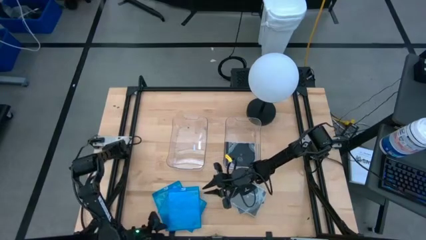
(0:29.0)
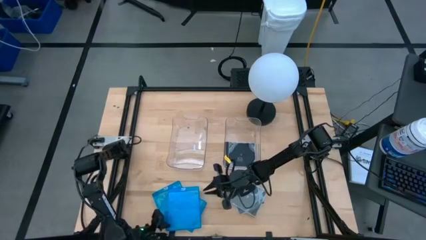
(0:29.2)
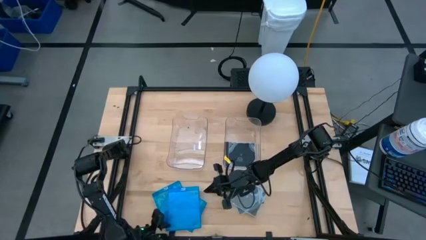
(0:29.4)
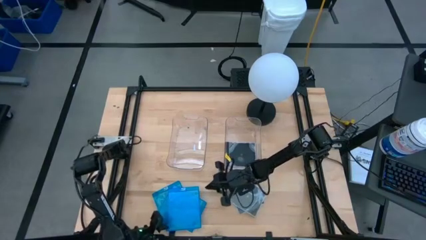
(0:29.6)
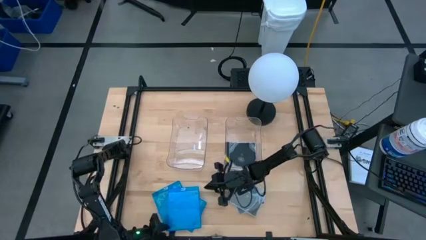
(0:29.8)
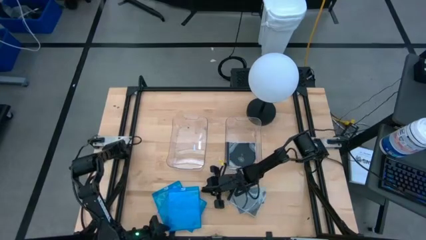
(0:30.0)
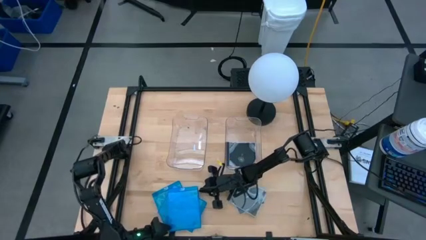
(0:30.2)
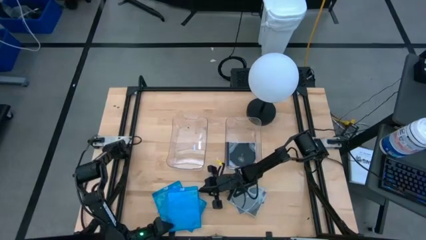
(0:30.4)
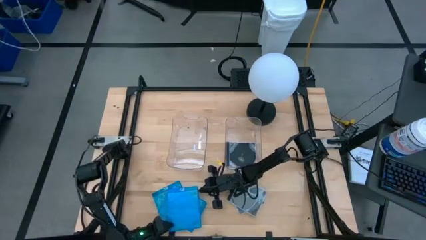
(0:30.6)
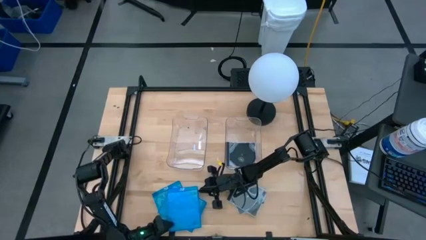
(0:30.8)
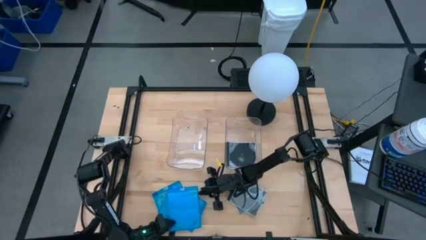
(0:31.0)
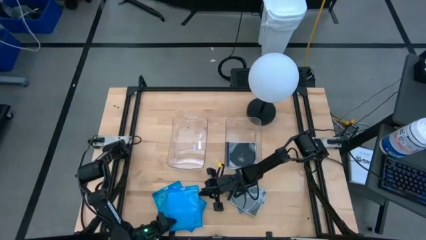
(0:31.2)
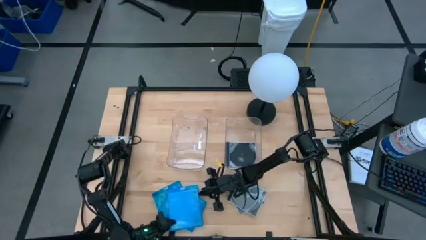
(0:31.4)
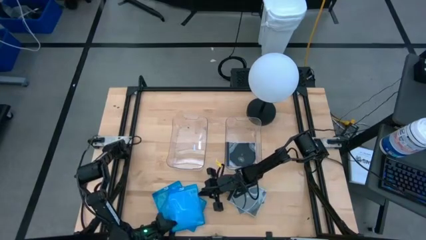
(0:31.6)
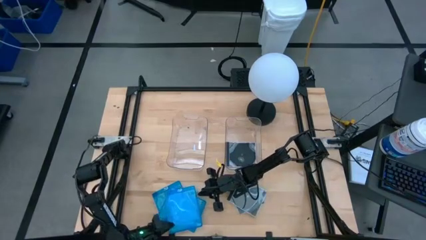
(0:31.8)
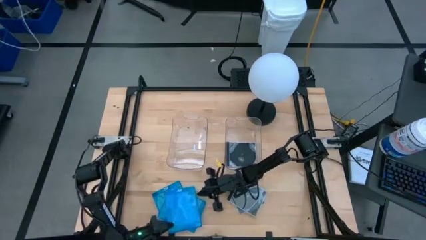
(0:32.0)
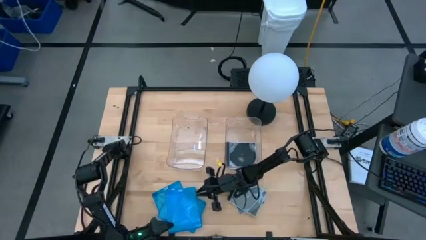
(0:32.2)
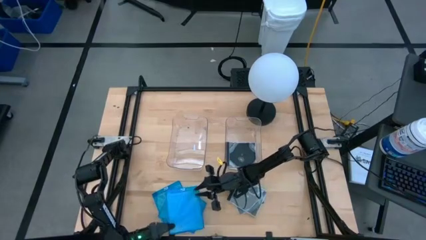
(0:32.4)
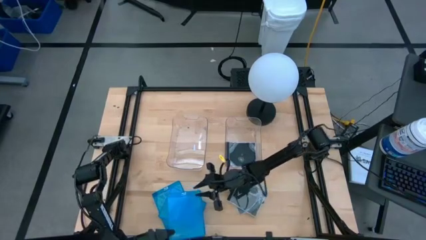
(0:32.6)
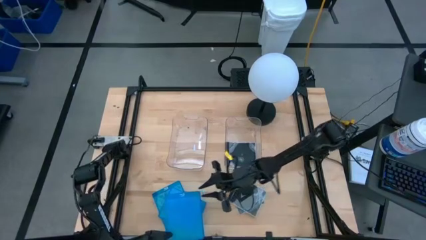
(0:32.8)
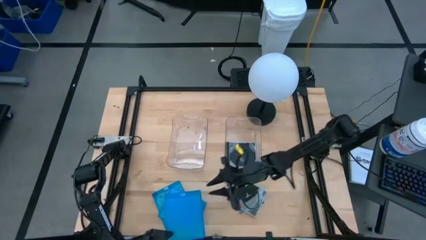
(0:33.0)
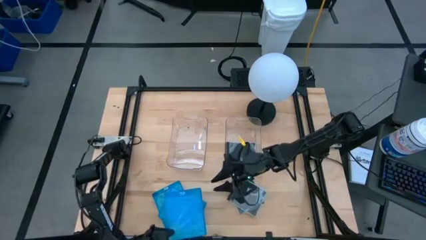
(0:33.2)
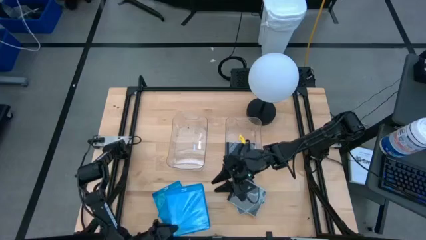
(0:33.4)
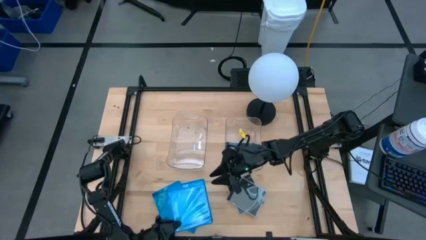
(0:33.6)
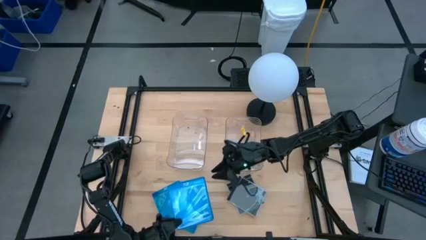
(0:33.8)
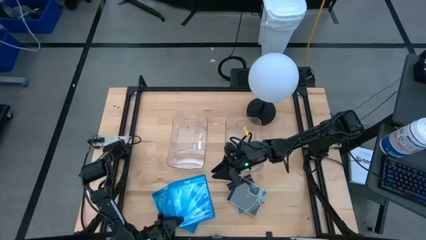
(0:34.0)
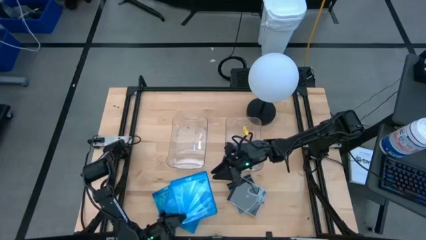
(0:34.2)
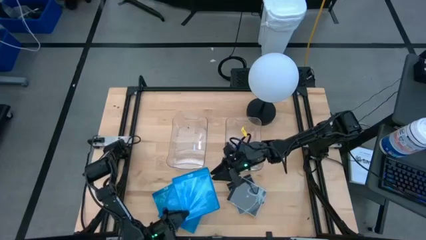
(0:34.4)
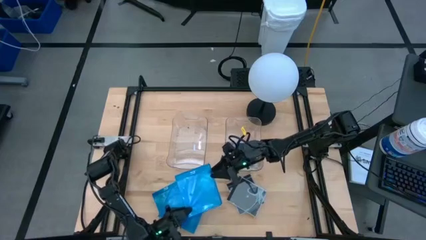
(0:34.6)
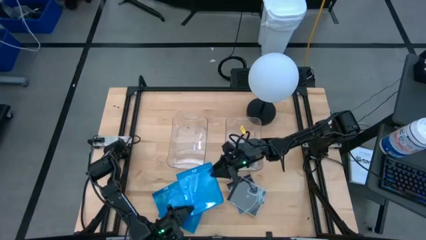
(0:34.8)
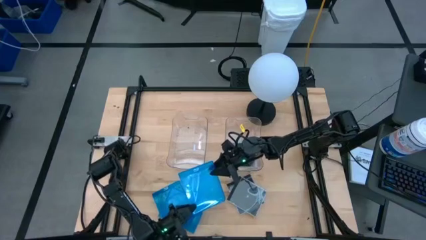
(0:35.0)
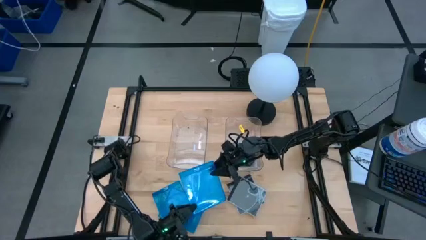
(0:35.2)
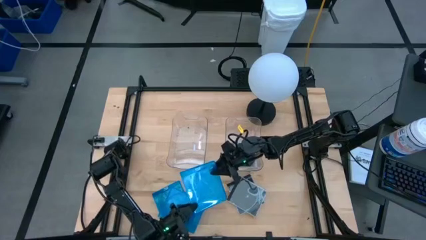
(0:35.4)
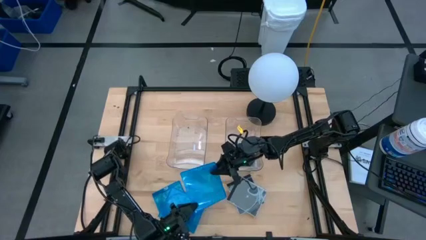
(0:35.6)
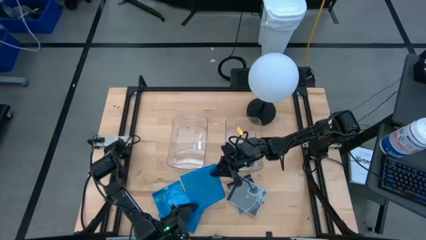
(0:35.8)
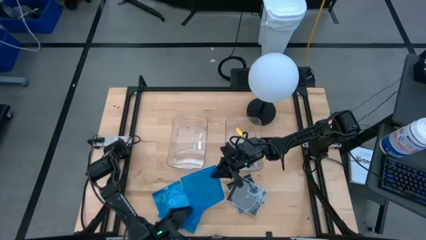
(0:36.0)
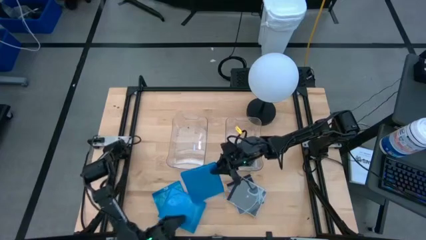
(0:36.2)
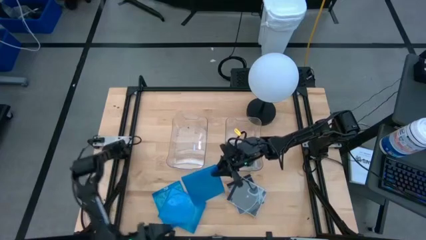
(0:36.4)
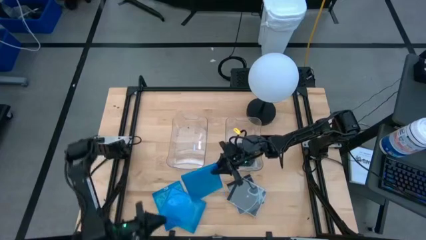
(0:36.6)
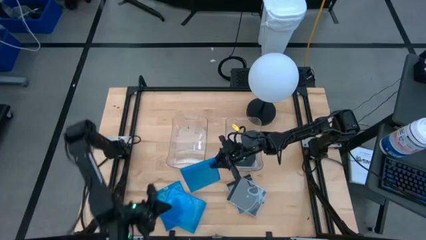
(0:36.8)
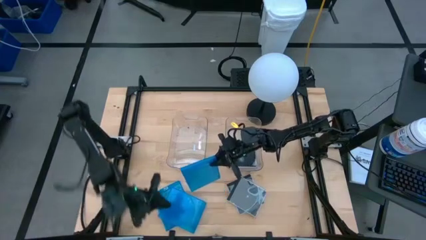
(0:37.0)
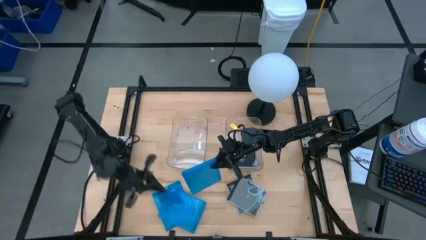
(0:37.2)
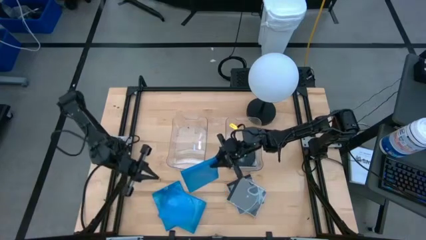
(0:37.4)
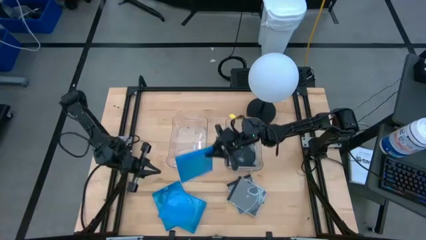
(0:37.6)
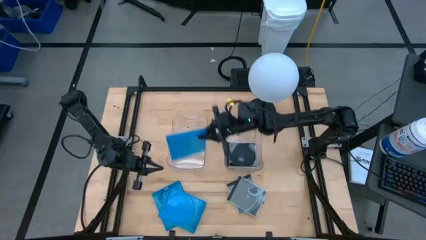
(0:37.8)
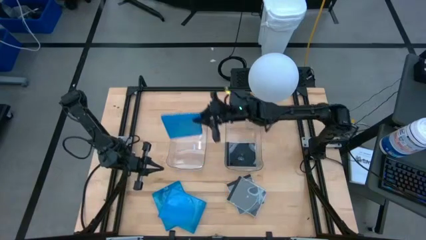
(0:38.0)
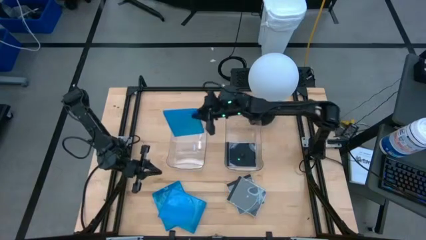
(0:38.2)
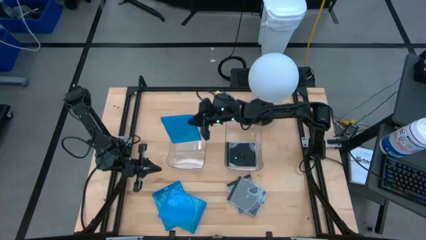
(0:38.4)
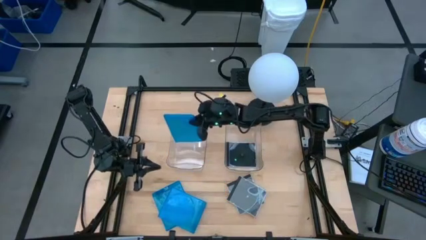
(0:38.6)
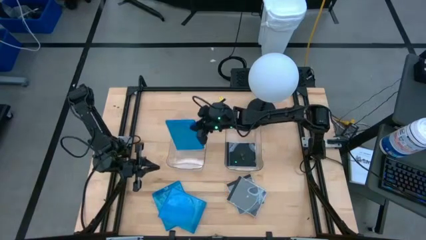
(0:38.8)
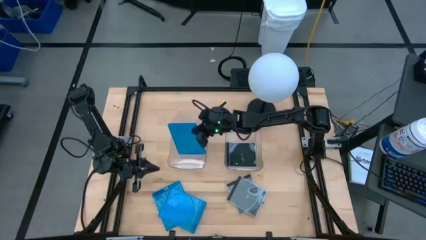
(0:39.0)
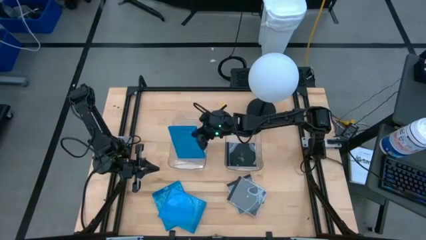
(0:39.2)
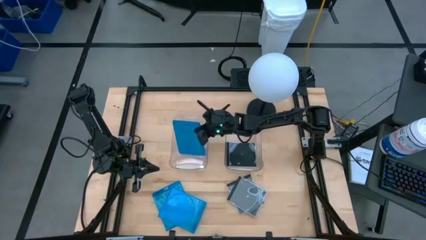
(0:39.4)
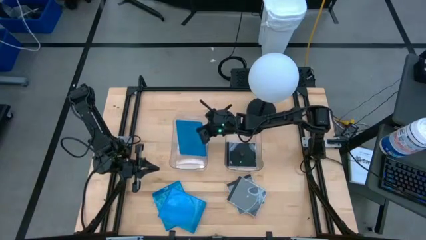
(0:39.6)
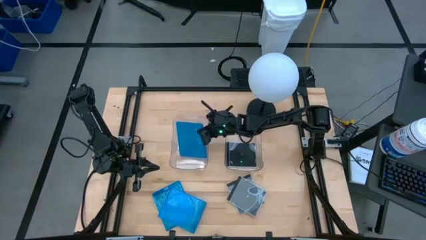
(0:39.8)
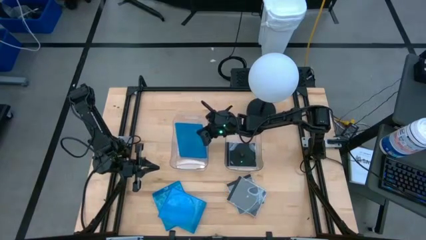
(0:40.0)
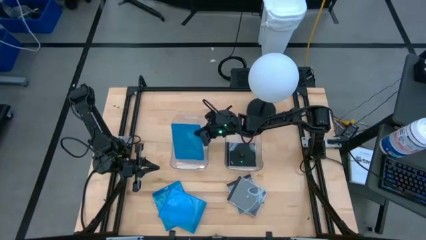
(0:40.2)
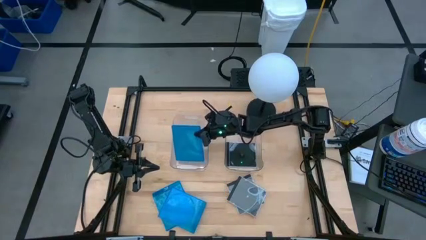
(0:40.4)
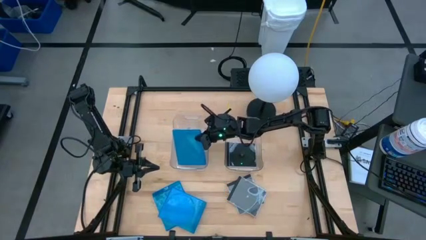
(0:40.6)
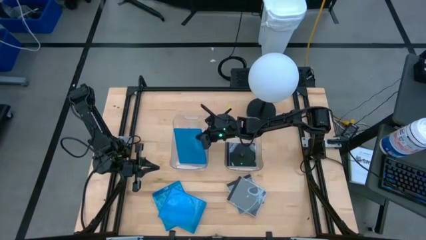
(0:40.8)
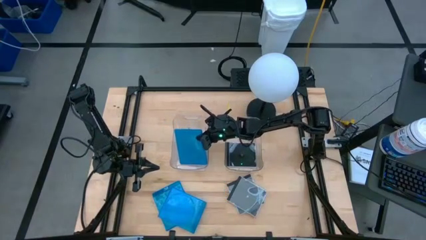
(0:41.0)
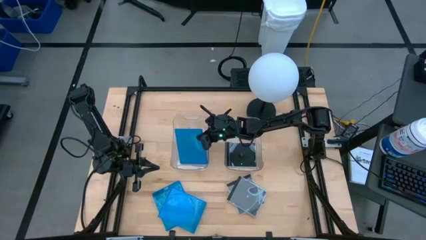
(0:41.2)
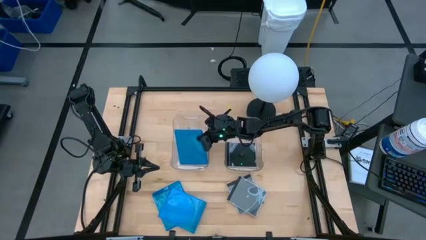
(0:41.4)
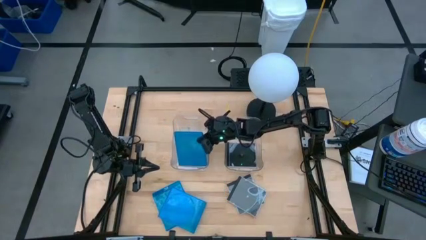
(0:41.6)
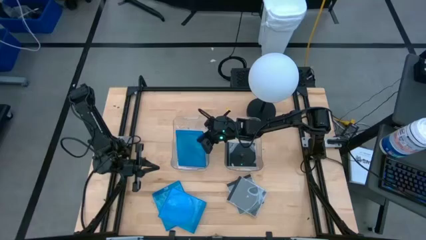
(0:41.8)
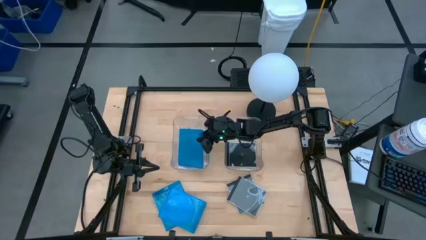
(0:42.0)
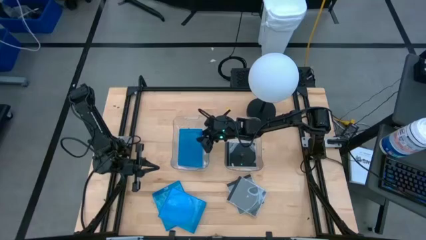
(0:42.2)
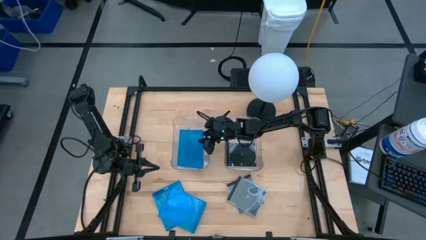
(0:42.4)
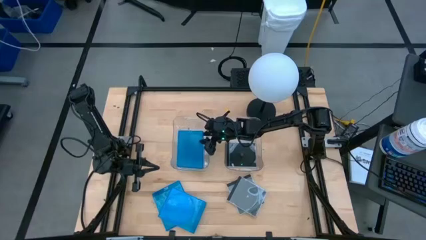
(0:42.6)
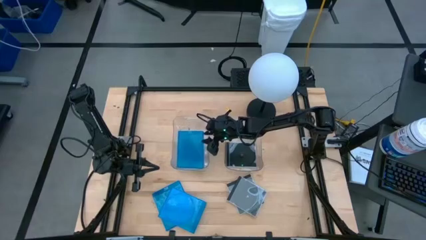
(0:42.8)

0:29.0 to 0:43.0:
Task: Pick & place jewel cases by type
Put the blue CD case into the left transparent bin

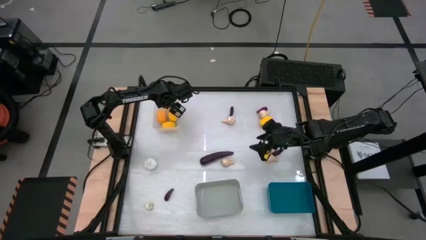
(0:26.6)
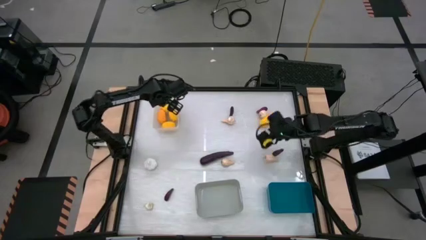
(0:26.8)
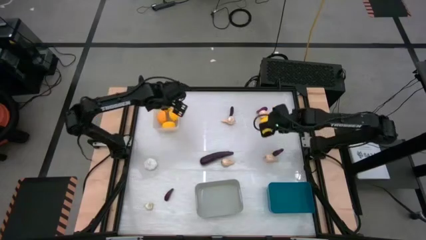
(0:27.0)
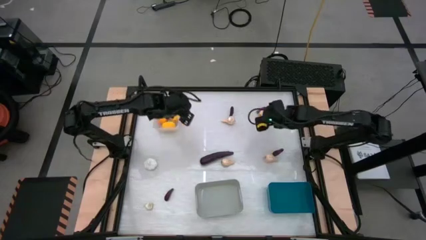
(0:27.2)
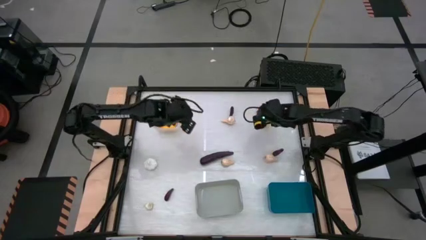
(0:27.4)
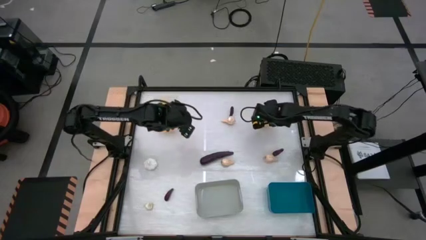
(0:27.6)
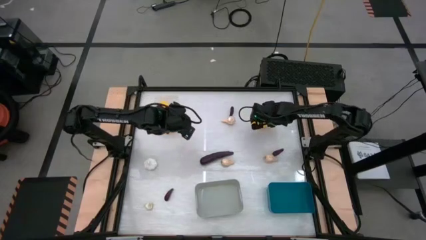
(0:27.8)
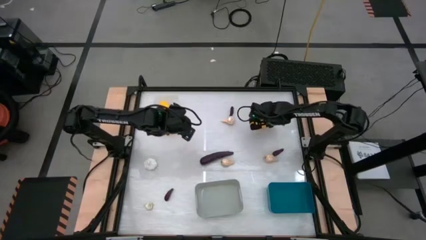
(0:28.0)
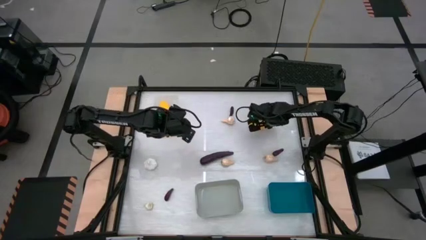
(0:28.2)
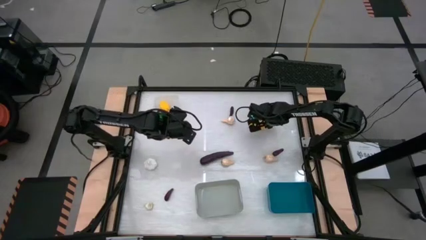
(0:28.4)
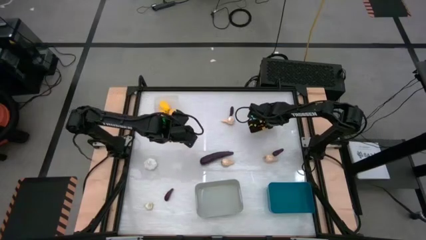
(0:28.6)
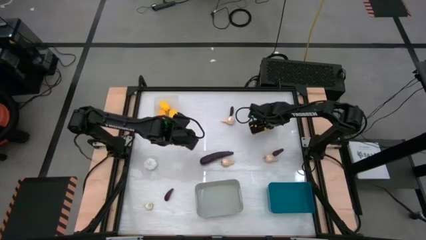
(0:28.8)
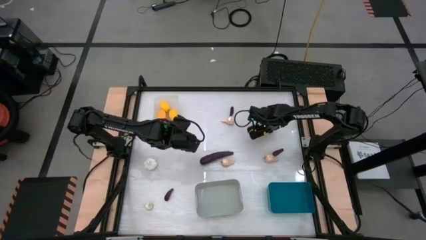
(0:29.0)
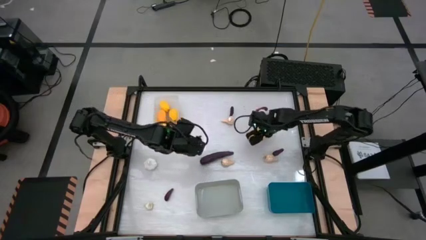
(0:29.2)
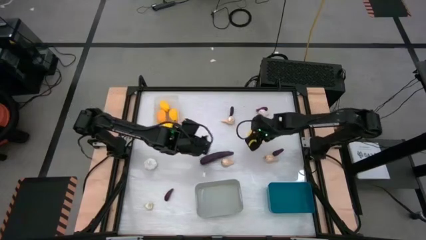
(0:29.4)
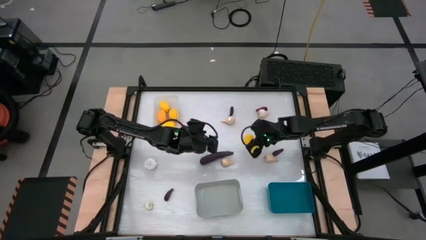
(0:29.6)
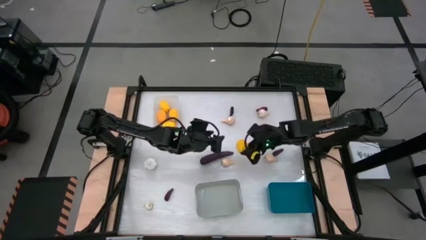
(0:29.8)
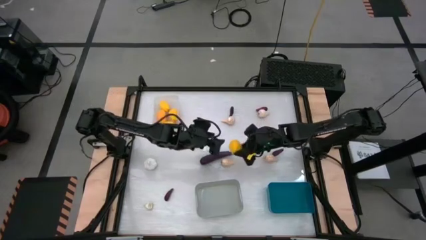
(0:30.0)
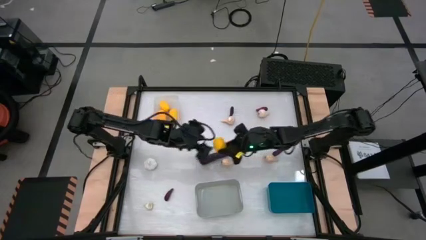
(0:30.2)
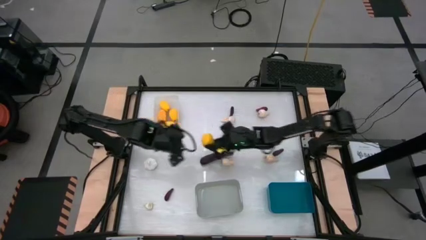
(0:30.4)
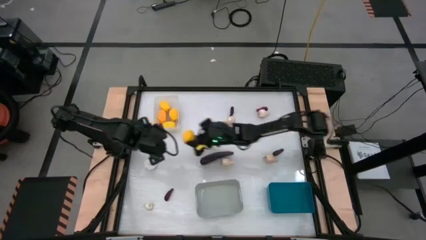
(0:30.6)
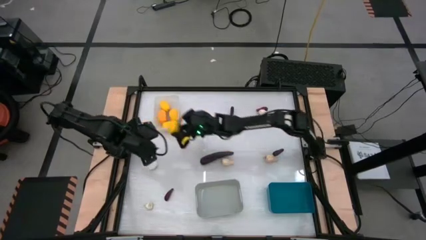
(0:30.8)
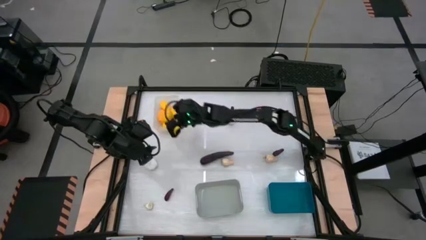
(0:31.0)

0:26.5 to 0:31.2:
Task: Sort produce into baskets
Put the lemon into the transparent bin
